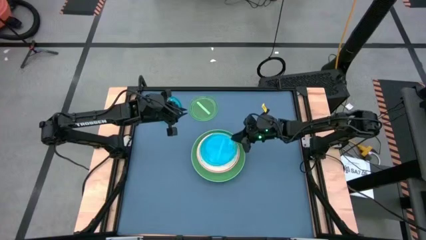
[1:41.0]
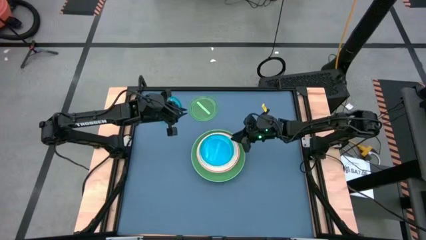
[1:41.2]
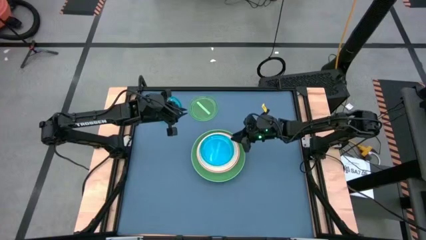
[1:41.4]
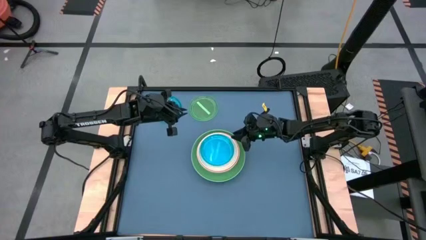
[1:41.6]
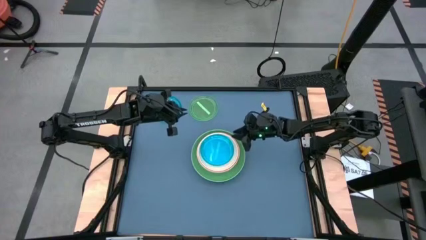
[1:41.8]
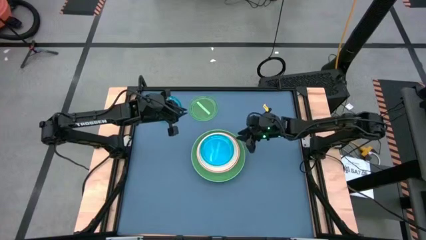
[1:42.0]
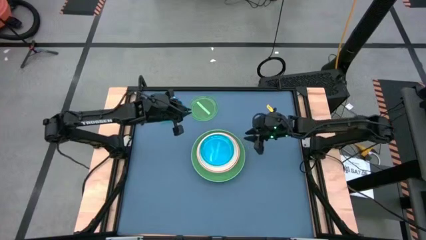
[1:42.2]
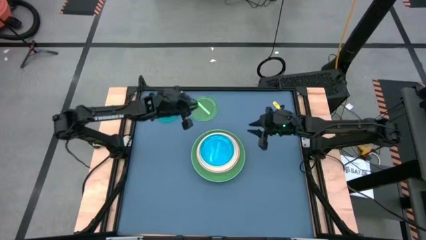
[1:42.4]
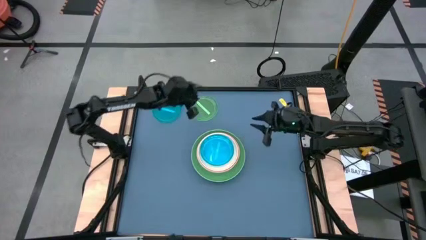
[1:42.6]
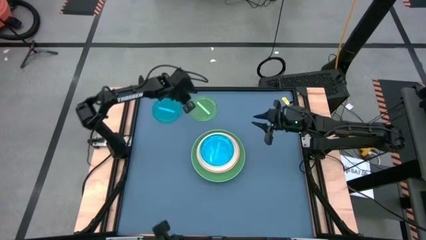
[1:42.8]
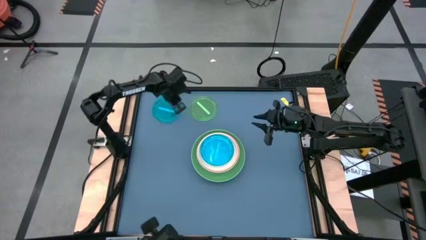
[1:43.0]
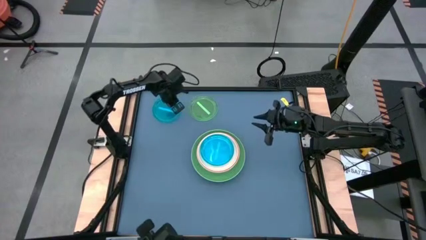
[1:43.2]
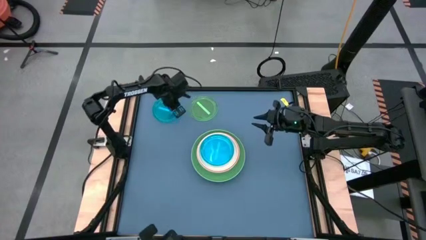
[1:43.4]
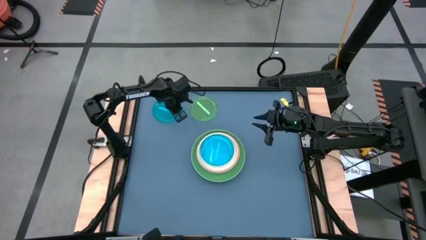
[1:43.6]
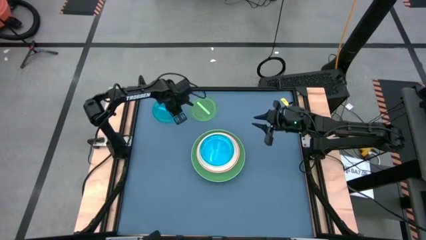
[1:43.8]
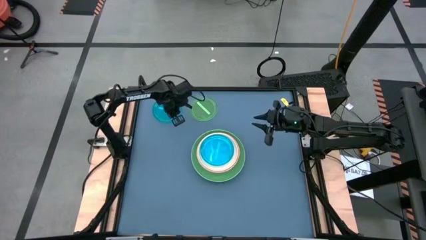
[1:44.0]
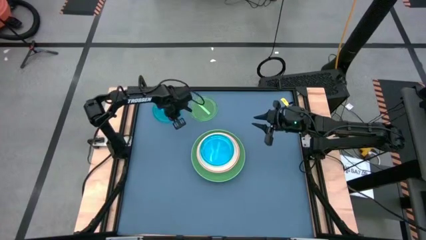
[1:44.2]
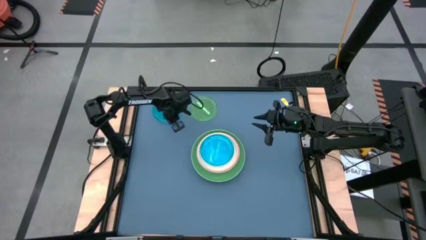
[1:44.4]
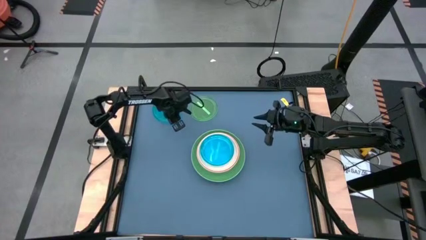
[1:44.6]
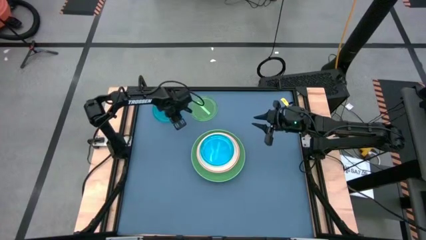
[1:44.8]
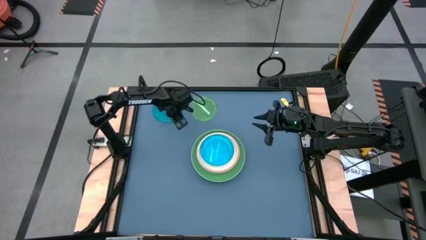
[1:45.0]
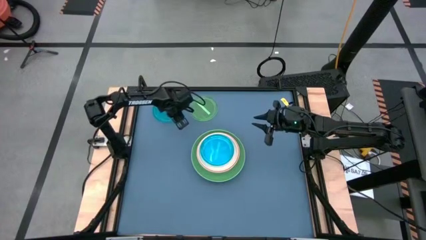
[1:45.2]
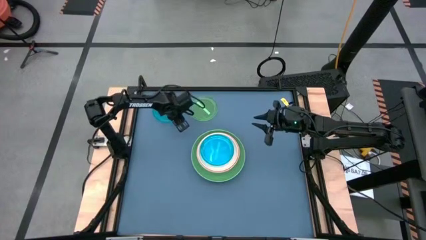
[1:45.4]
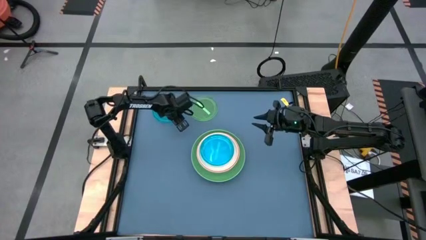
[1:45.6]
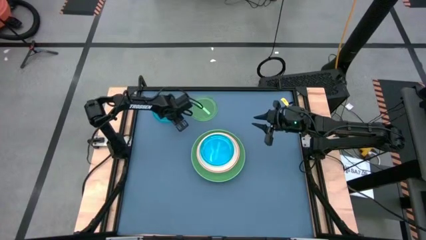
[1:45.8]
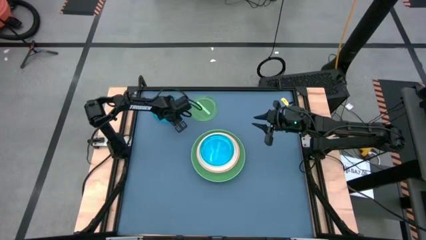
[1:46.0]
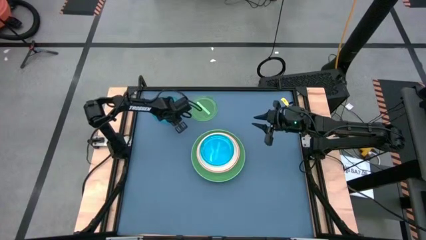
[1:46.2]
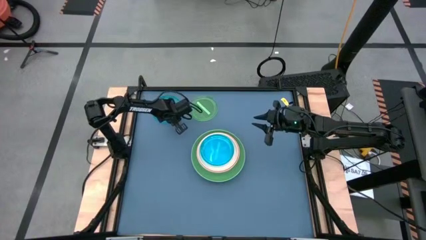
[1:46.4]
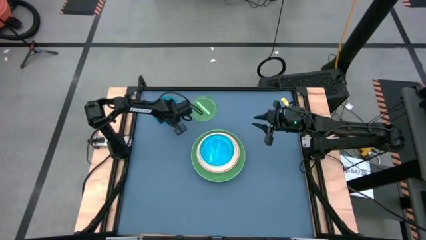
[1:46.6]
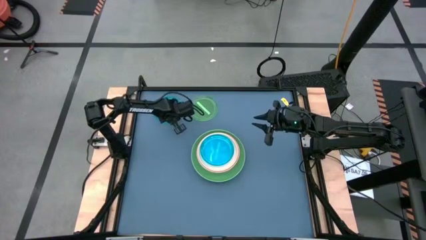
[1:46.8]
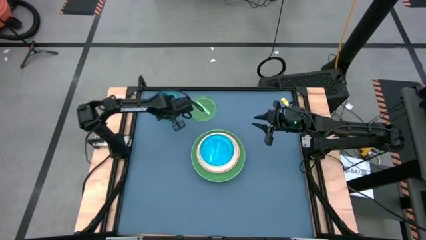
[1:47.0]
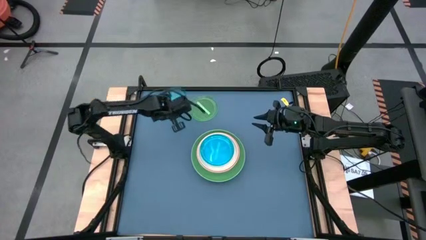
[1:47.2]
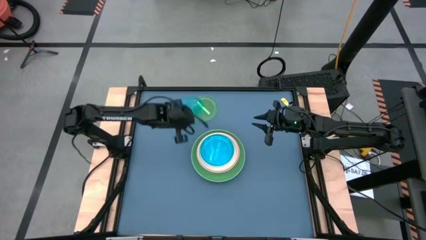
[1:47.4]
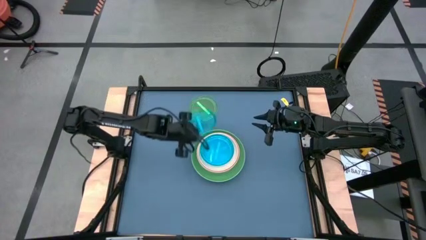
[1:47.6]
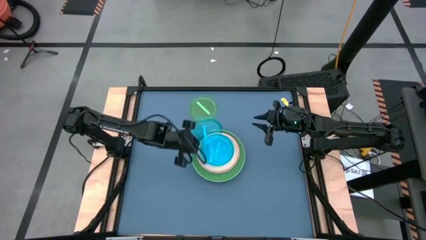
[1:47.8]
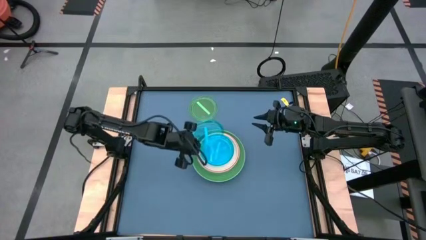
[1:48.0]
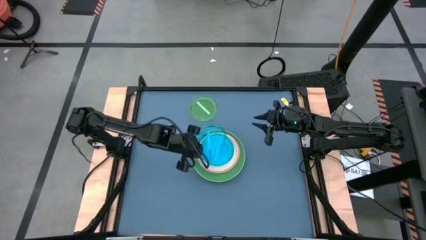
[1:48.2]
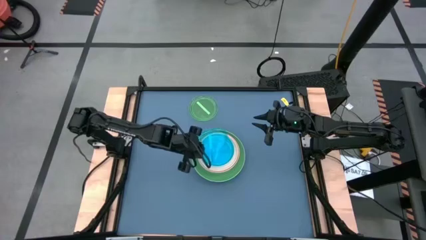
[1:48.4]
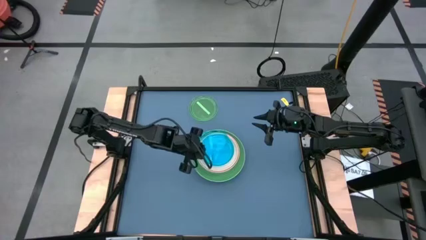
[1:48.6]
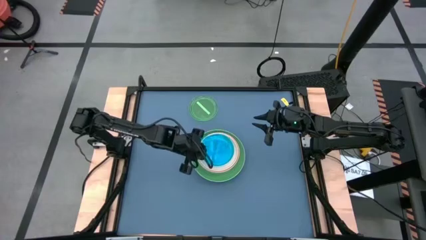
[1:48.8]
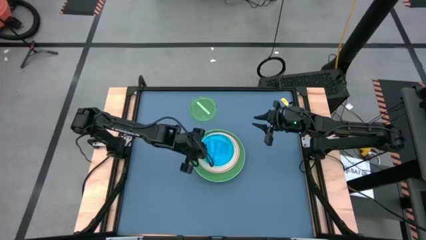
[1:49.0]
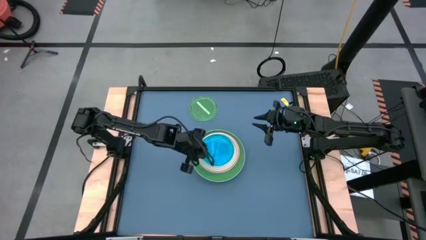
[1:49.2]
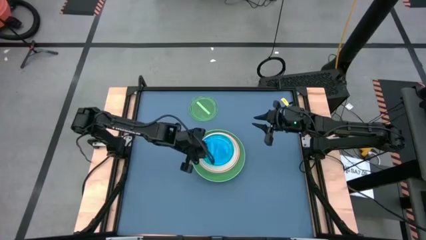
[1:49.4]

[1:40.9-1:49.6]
Task: Stack plastic plates
Stack the blue plate on the blue plate

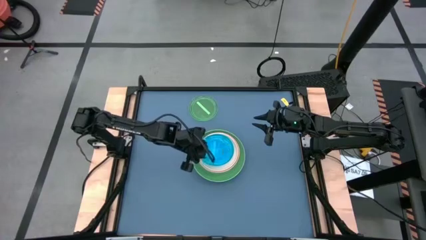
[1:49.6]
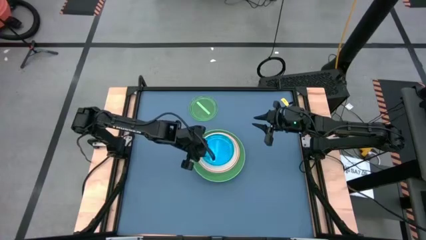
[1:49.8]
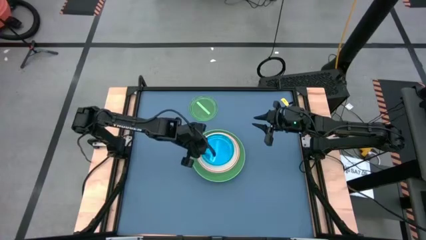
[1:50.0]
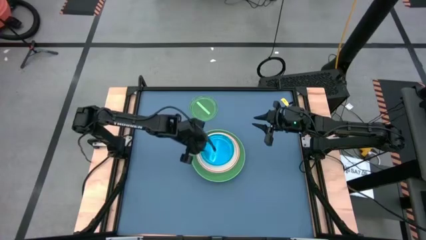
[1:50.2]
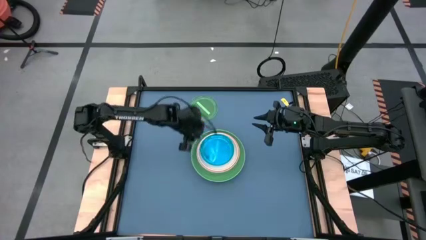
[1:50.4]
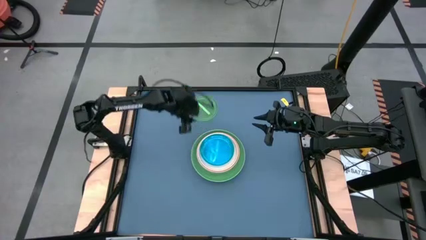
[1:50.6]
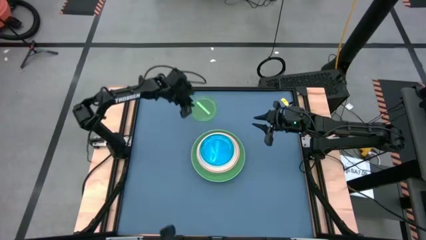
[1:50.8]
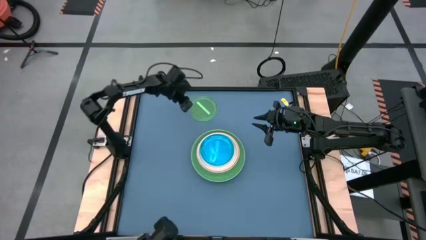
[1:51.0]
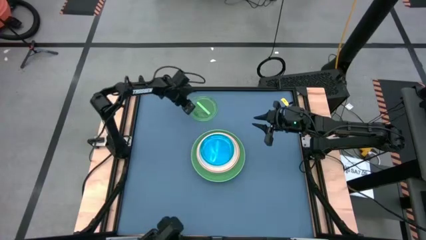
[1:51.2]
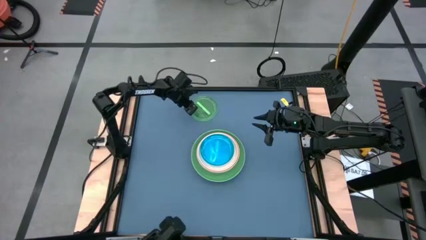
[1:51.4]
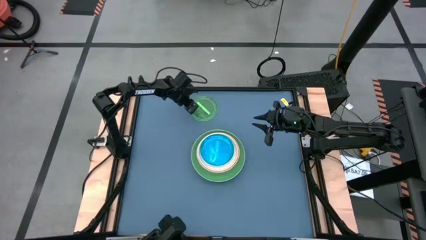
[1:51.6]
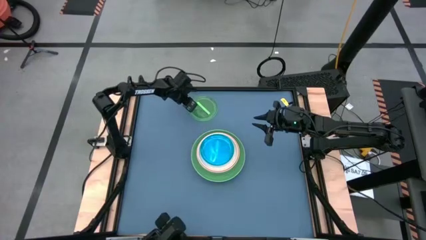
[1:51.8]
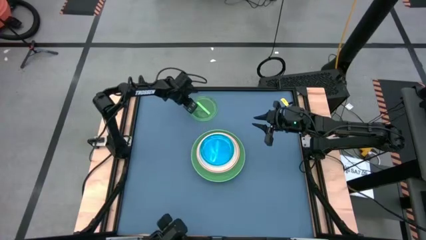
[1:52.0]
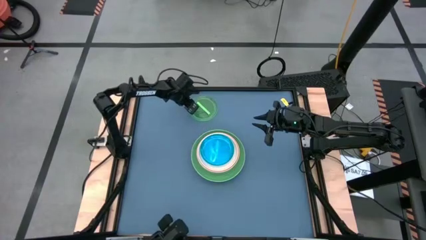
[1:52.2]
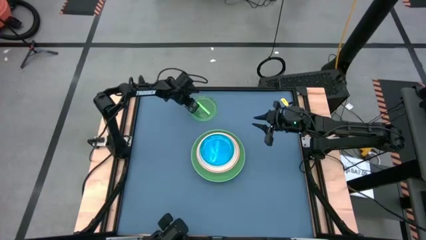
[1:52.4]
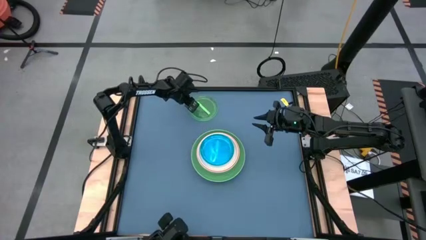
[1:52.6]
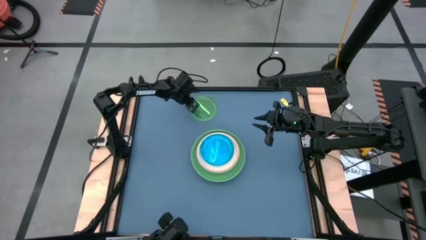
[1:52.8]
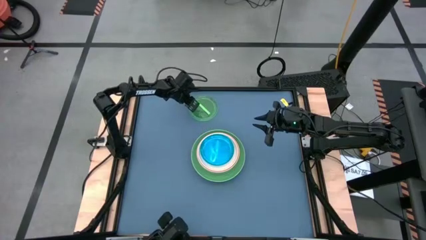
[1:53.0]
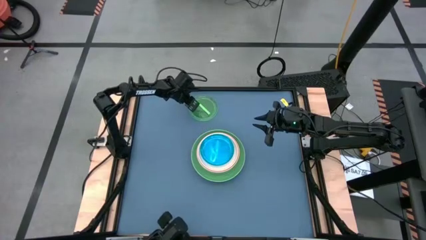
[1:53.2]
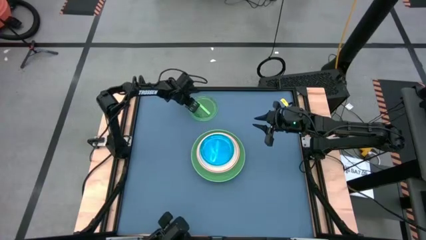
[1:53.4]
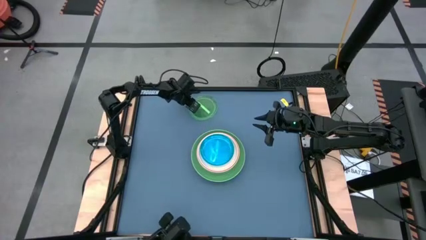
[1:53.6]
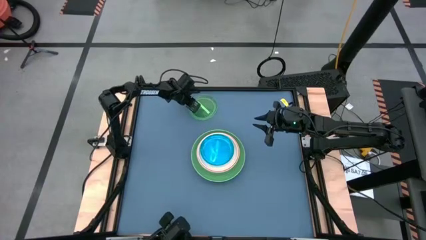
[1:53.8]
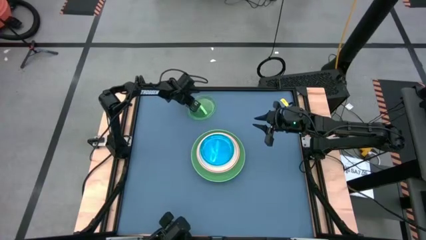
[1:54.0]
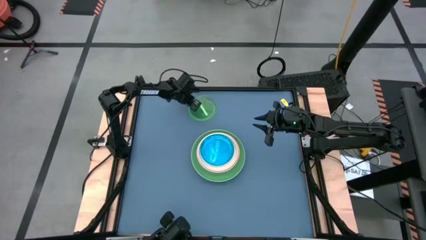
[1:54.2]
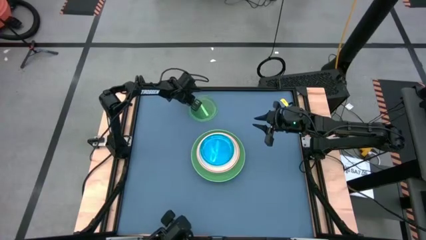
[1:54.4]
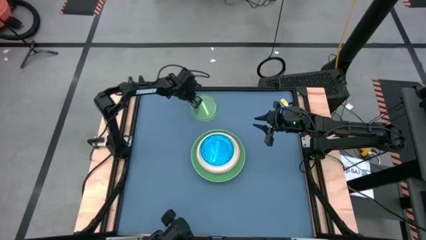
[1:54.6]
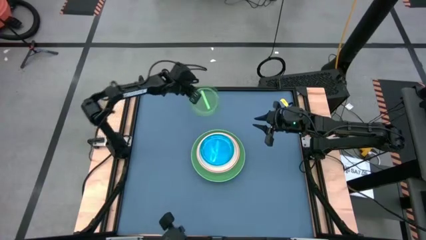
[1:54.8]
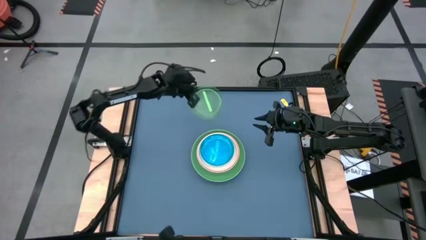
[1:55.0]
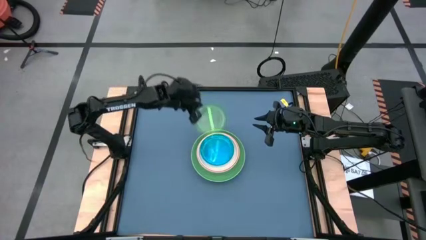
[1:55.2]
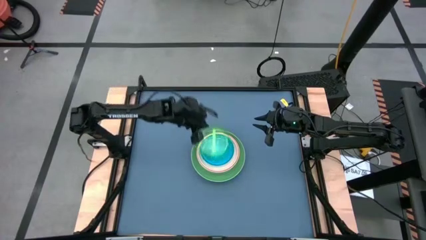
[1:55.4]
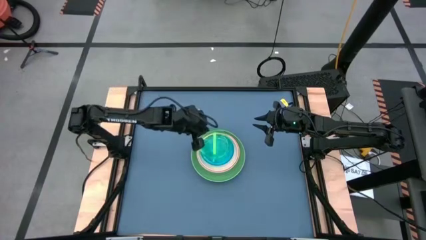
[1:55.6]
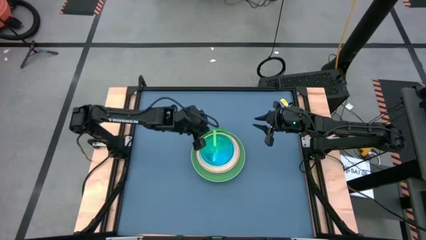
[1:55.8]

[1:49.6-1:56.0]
Stack the green plate on the blue plate
